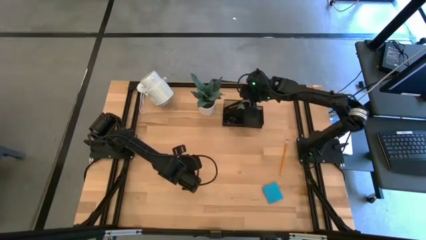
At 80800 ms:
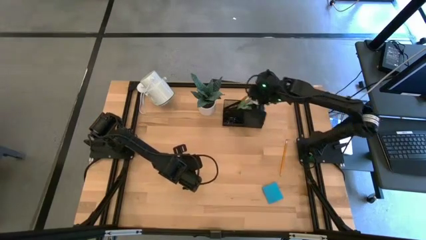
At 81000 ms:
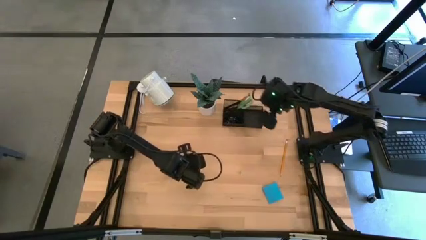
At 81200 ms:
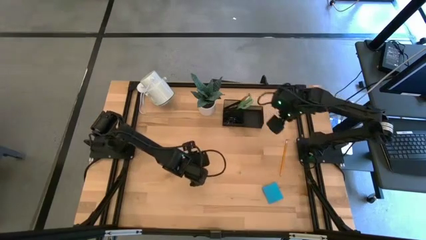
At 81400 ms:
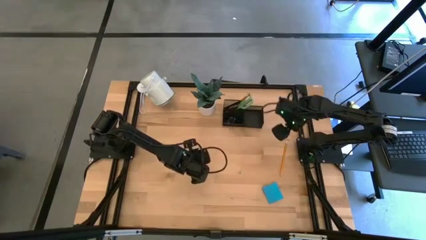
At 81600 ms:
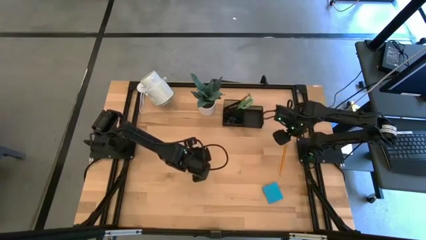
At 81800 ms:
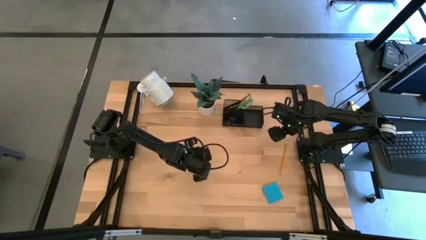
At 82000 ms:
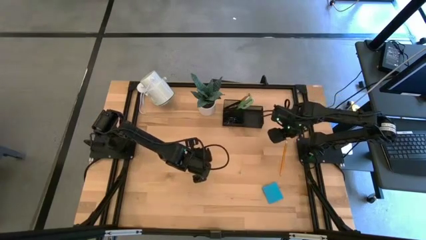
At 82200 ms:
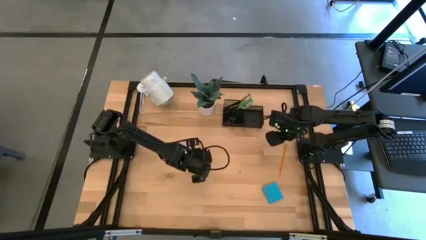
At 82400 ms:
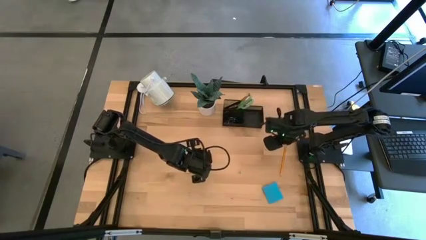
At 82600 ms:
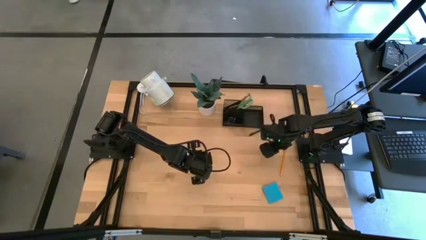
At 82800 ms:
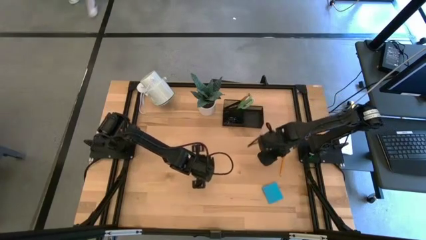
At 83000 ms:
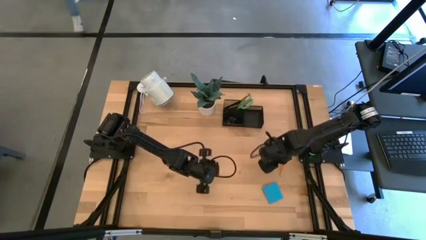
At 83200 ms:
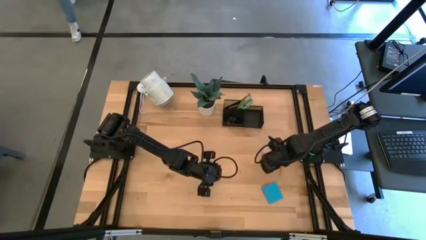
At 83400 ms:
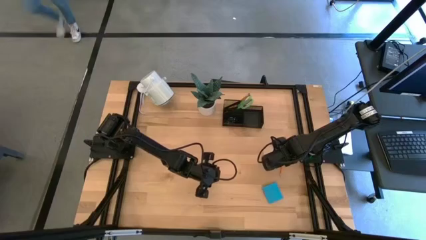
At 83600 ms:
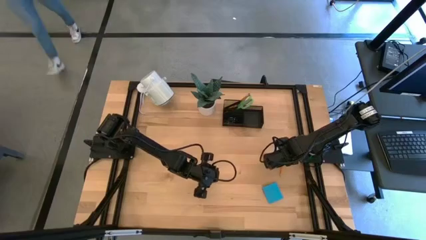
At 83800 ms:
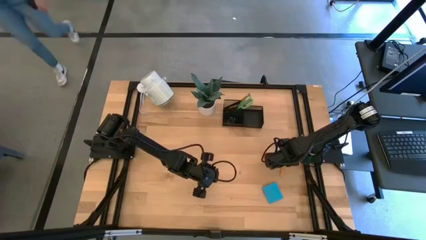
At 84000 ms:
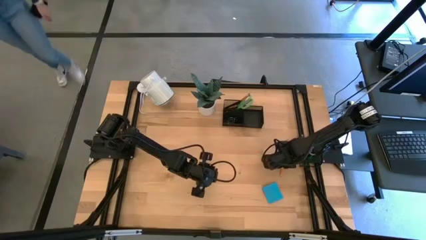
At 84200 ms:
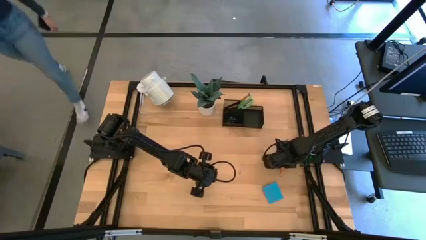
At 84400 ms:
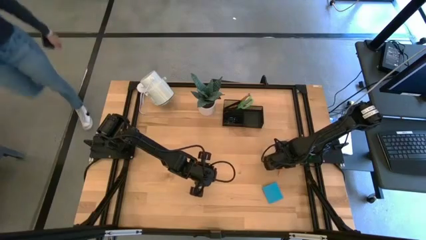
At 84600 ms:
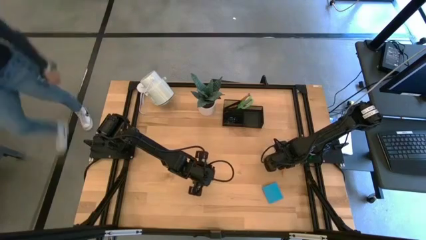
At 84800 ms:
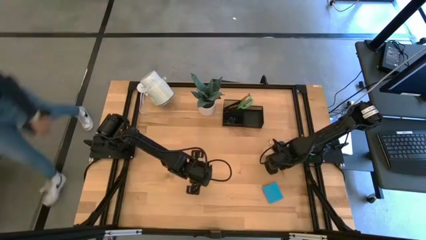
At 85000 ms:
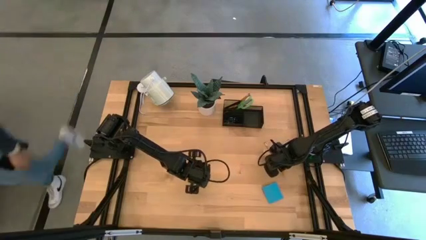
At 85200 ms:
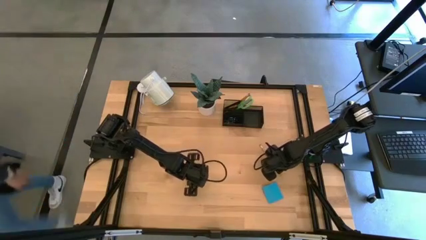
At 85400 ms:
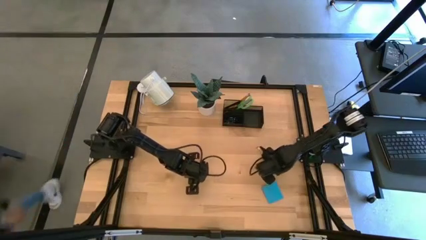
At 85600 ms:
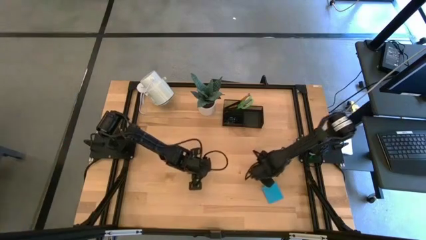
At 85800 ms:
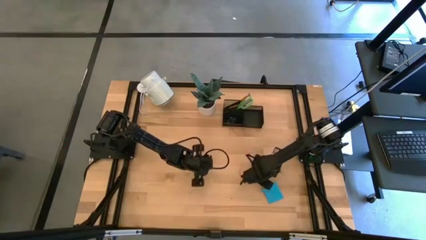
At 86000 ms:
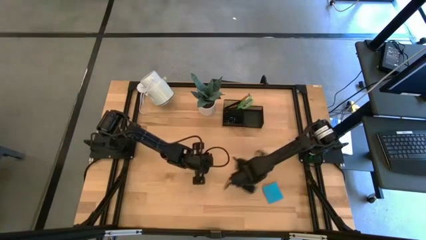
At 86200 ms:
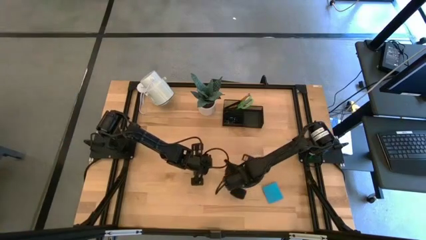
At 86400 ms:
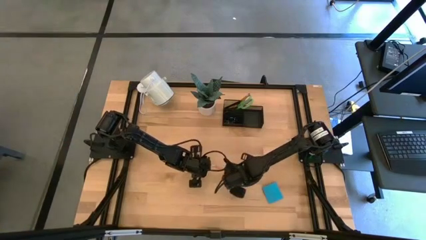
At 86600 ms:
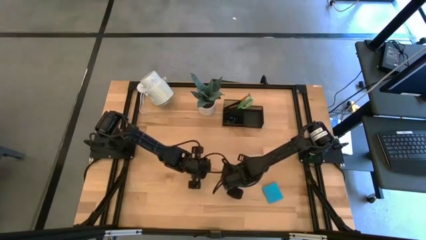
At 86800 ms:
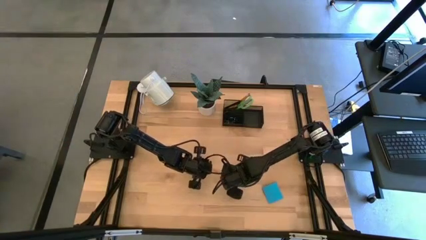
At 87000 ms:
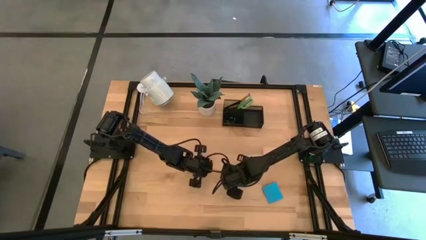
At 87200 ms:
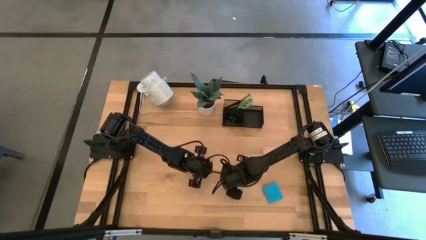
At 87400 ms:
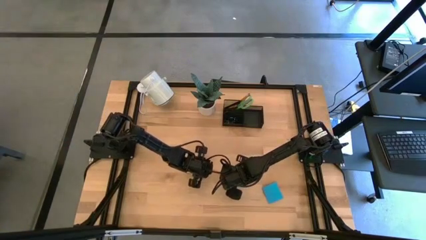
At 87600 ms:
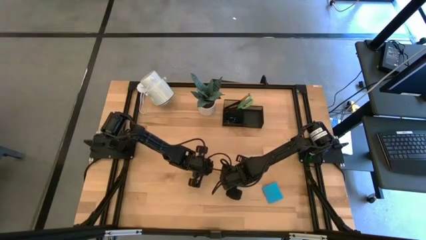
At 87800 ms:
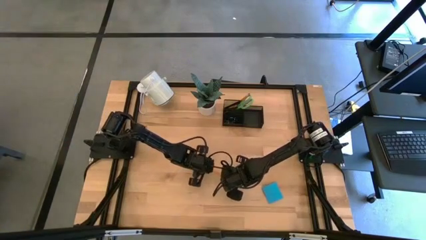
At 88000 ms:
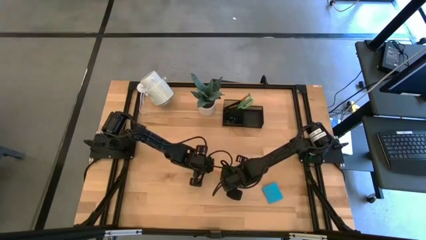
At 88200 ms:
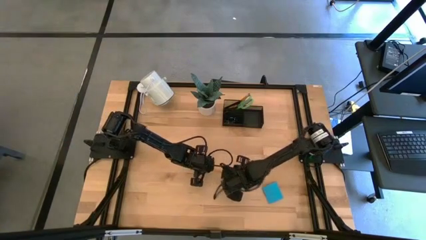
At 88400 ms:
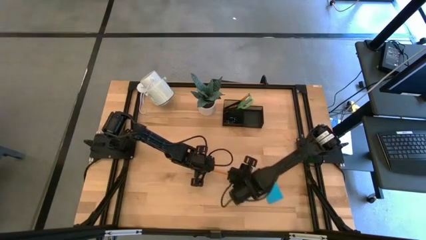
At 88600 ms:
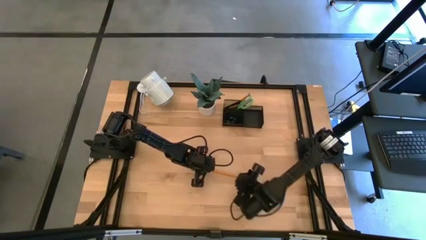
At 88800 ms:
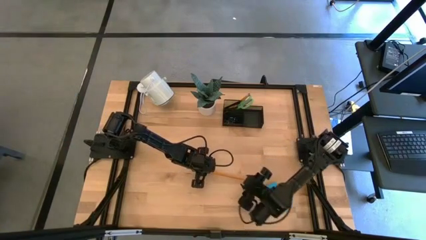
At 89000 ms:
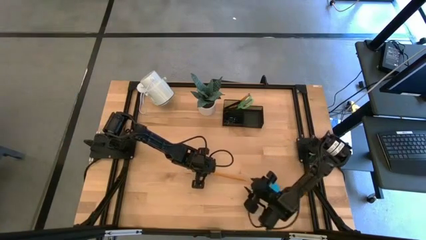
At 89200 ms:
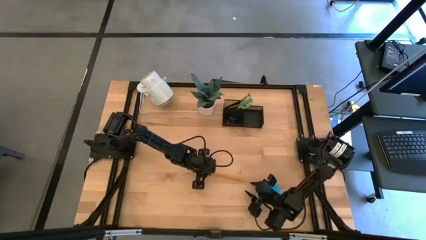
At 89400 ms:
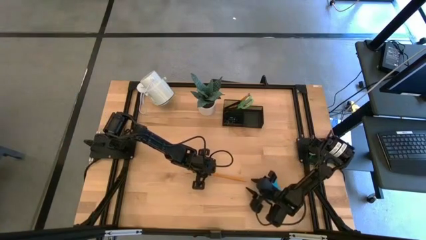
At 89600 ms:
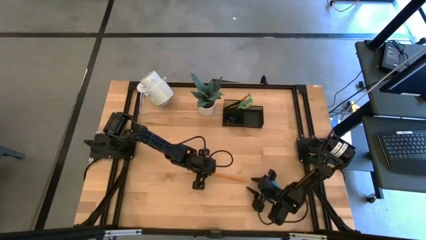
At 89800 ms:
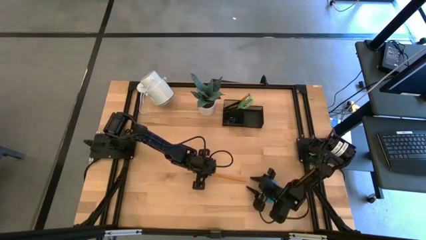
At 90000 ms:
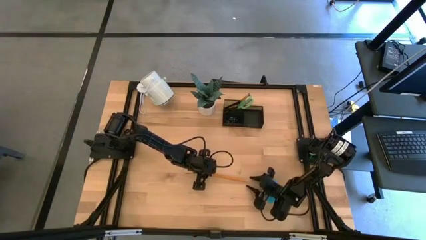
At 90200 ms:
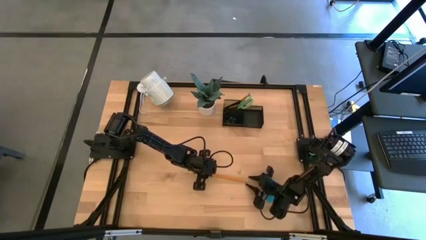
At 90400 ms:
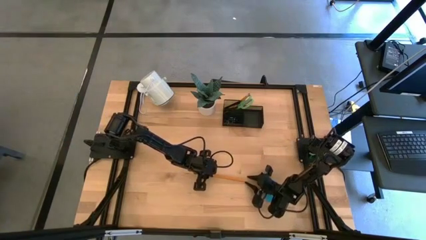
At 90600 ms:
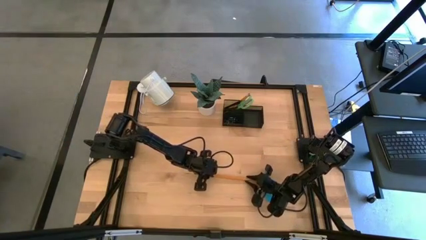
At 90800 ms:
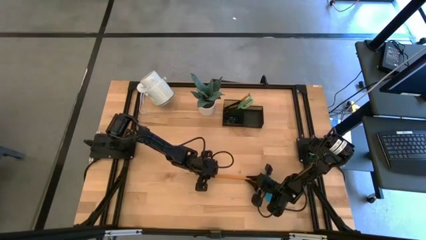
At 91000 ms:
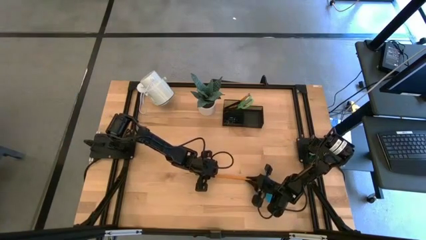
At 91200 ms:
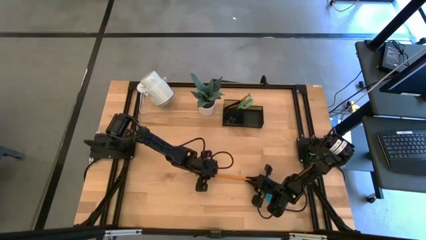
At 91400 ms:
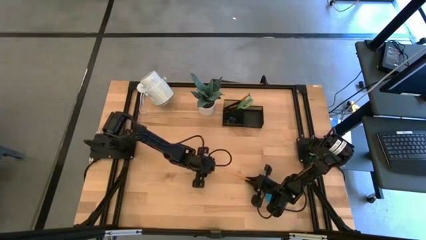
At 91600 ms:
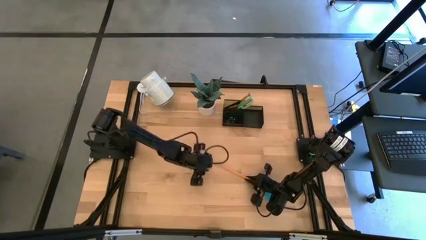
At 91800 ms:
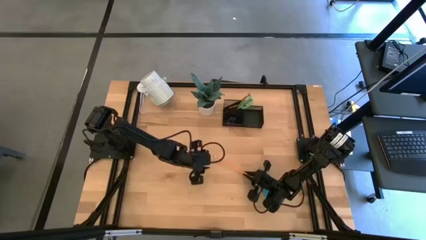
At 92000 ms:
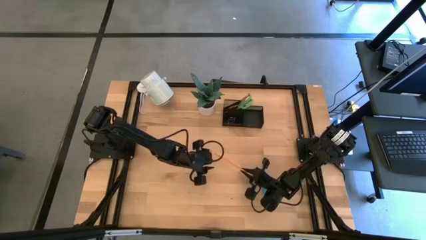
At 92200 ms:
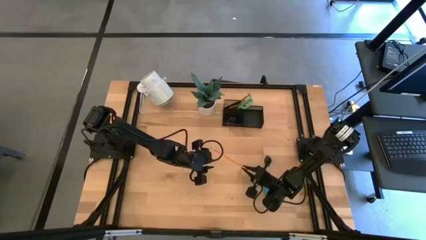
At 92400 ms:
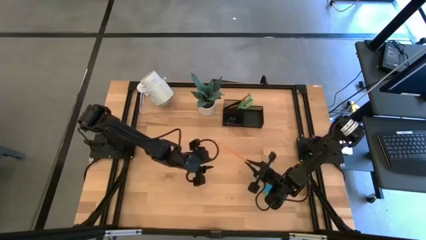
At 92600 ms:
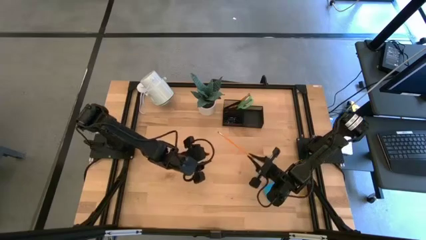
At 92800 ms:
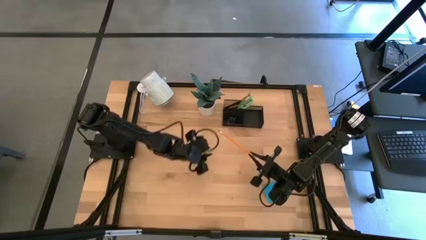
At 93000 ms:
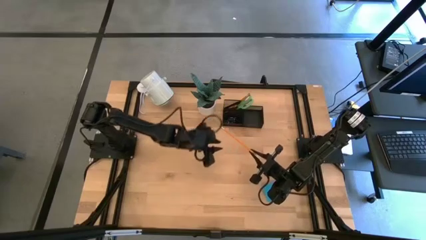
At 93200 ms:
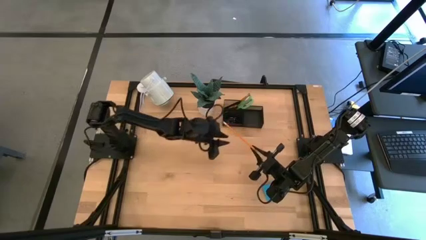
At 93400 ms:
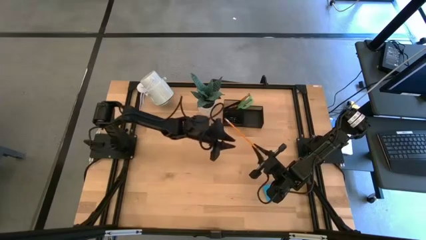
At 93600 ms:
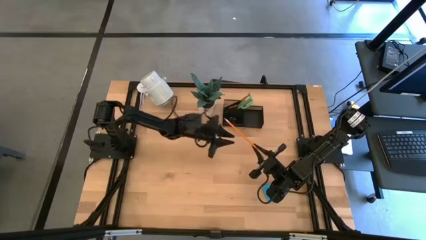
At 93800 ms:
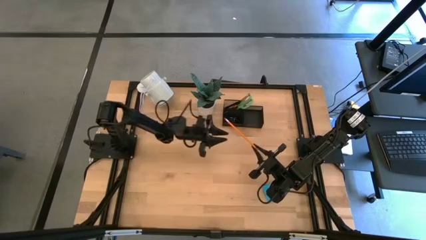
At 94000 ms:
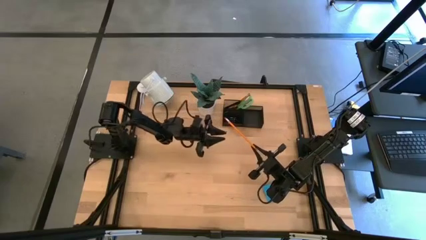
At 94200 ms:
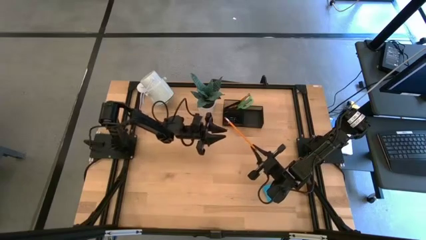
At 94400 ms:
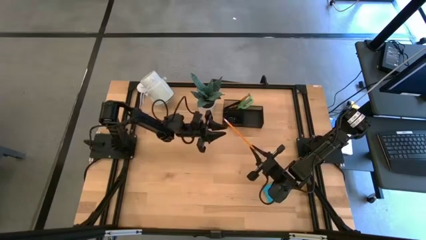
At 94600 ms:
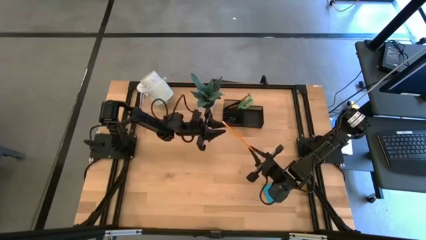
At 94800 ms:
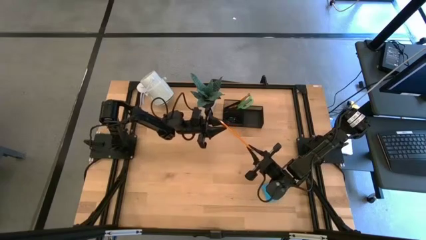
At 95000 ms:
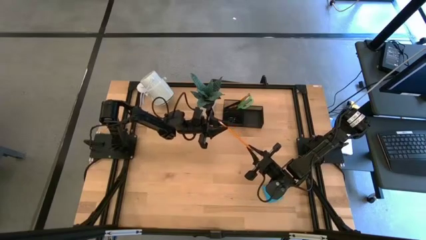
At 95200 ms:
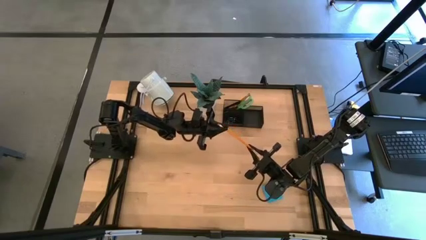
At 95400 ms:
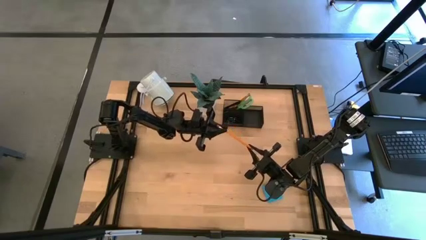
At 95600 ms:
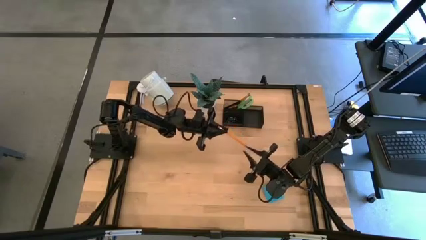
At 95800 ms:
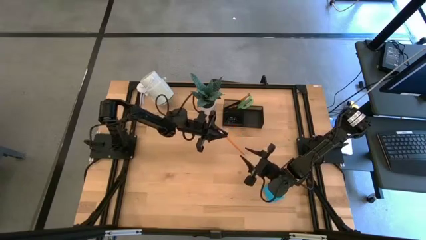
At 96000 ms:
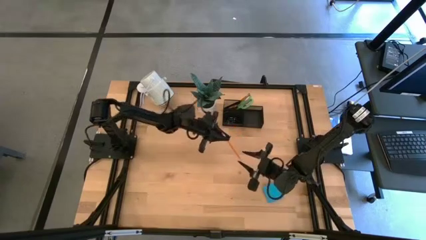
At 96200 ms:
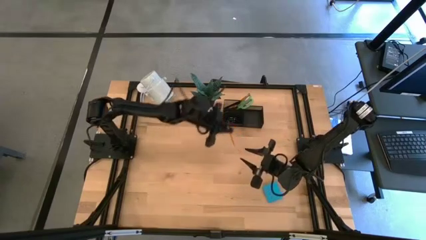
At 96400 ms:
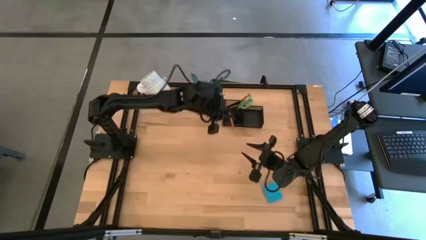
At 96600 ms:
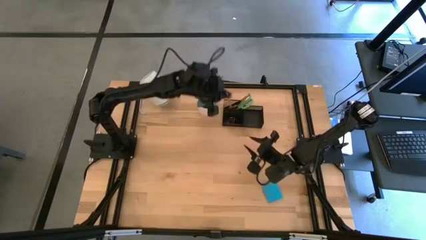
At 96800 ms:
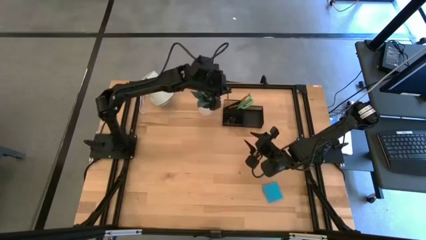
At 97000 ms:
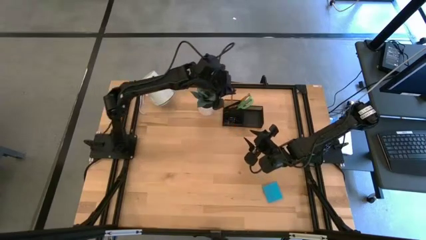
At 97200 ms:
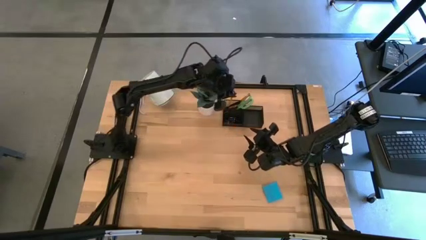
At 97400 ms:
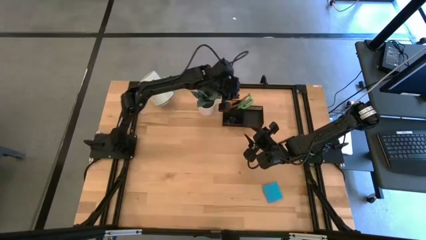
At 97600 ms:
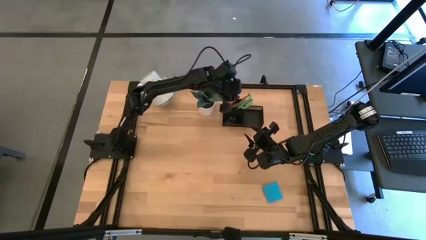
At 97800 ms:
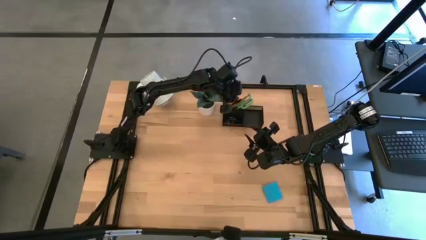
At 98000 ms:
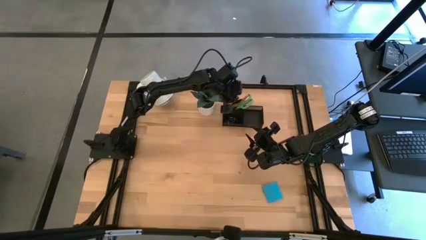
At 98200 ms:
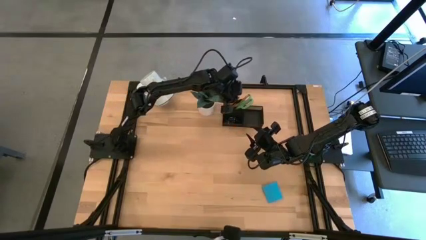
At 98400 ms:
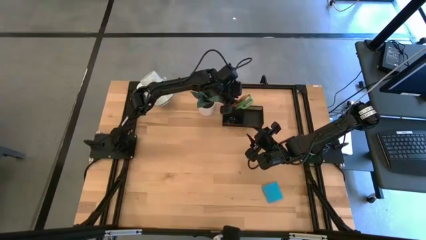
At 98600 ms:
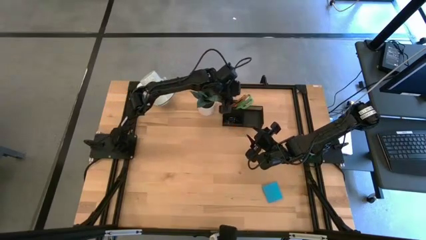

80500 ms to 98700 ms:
Task: Pick and place office supplies into organizer
Put the orange pencil into the desk organizer
